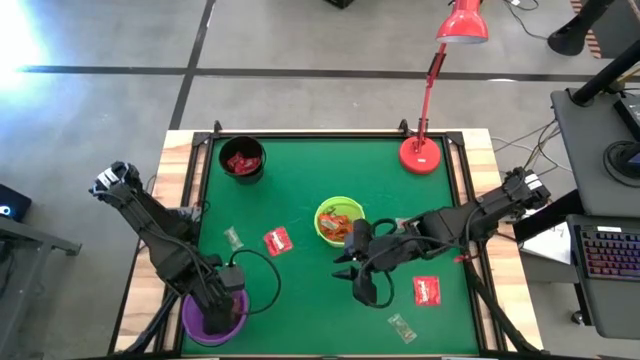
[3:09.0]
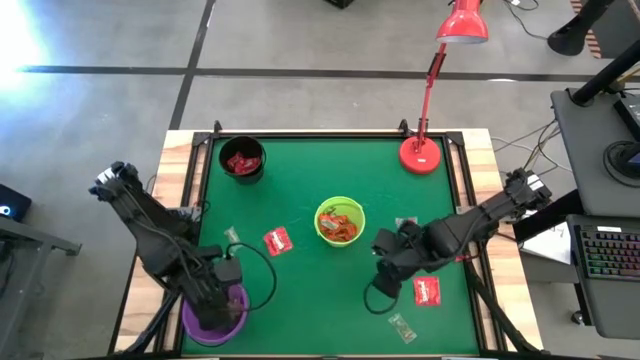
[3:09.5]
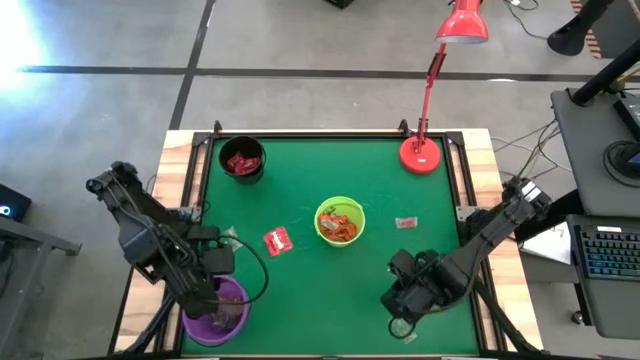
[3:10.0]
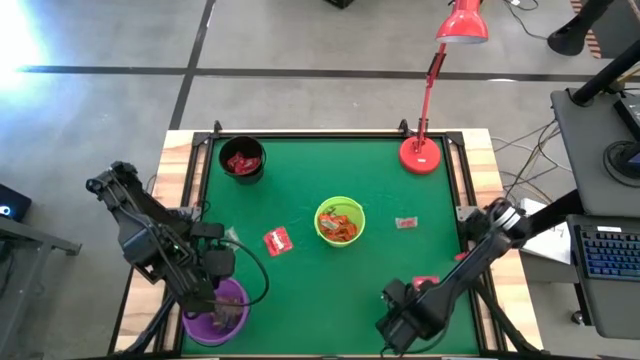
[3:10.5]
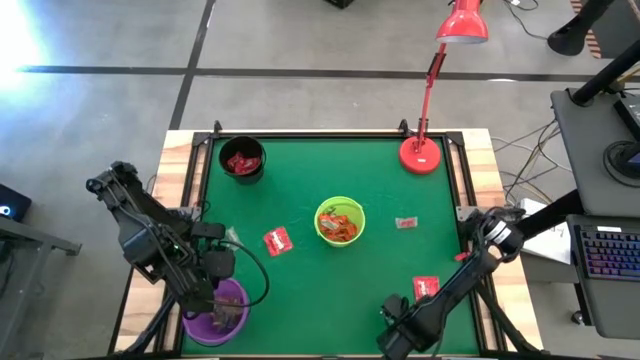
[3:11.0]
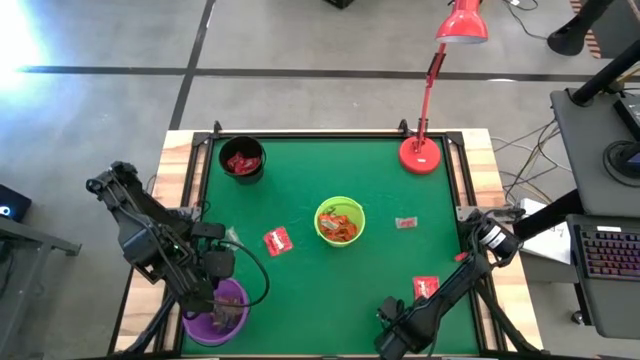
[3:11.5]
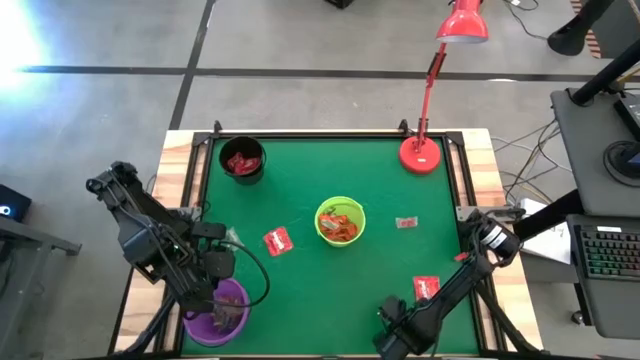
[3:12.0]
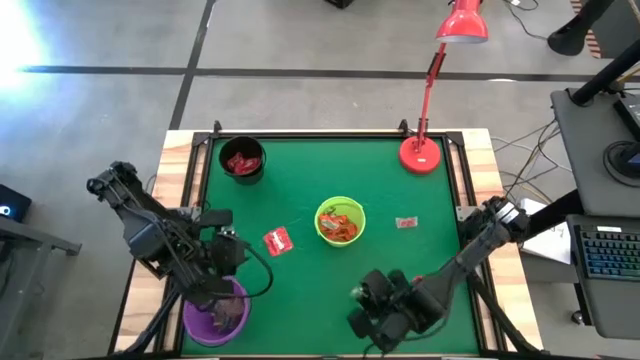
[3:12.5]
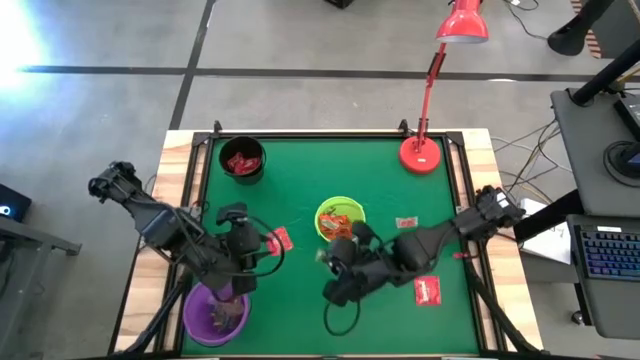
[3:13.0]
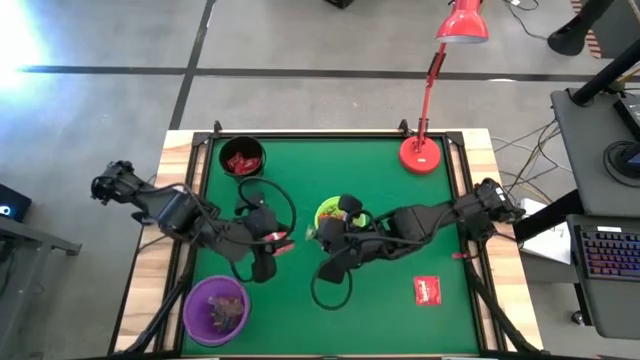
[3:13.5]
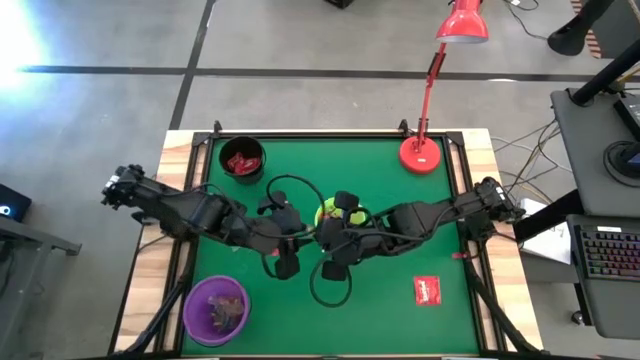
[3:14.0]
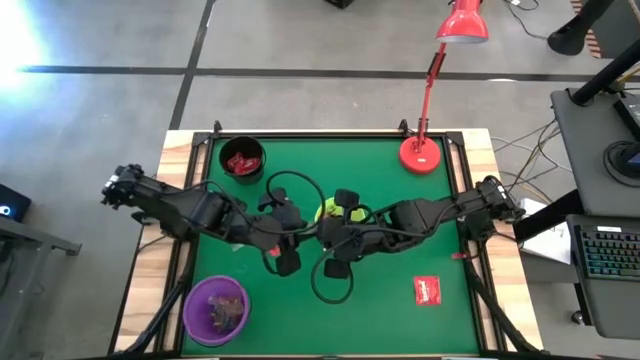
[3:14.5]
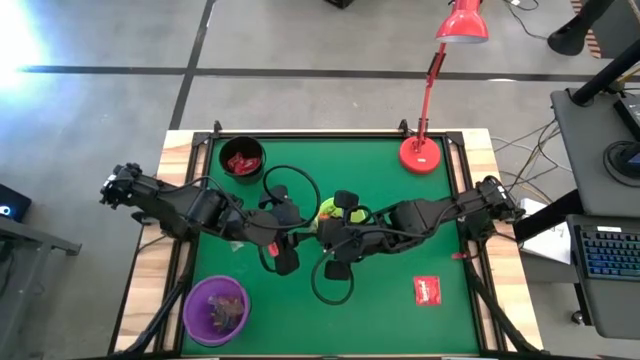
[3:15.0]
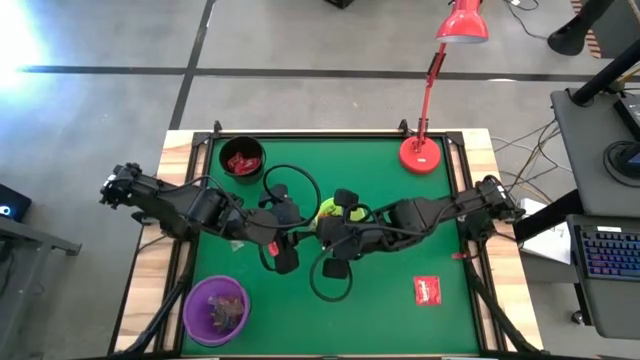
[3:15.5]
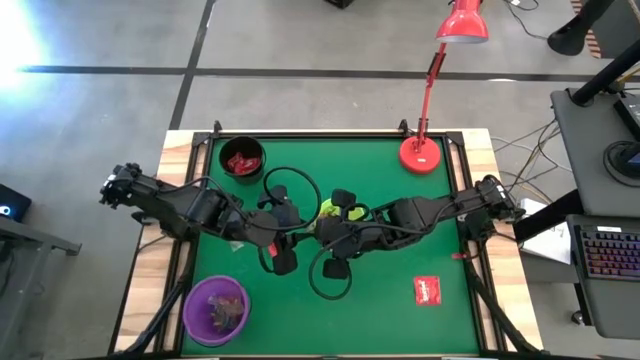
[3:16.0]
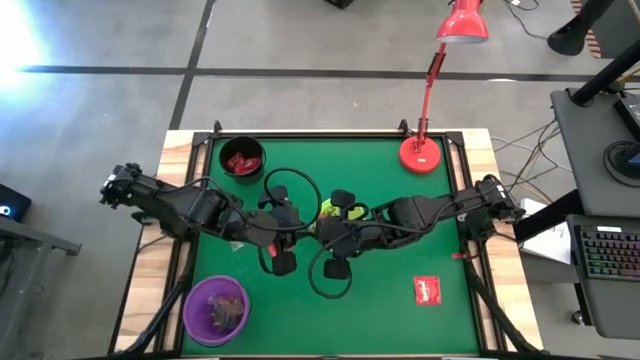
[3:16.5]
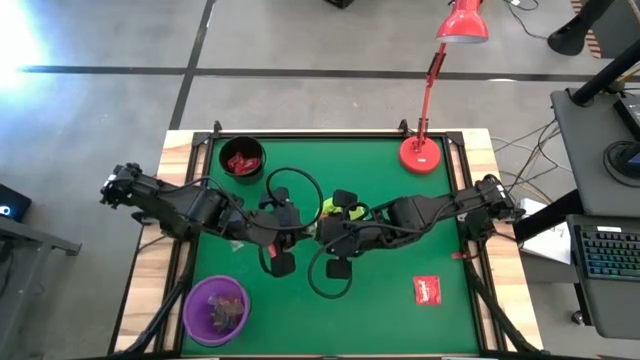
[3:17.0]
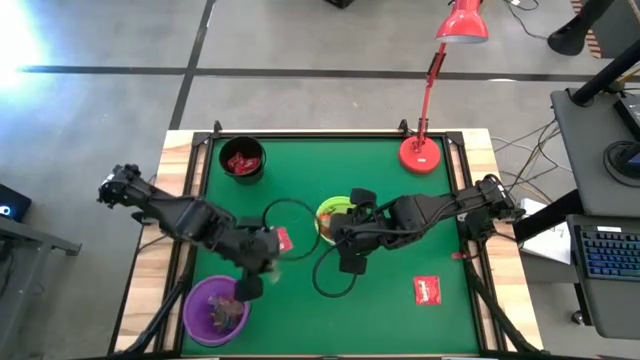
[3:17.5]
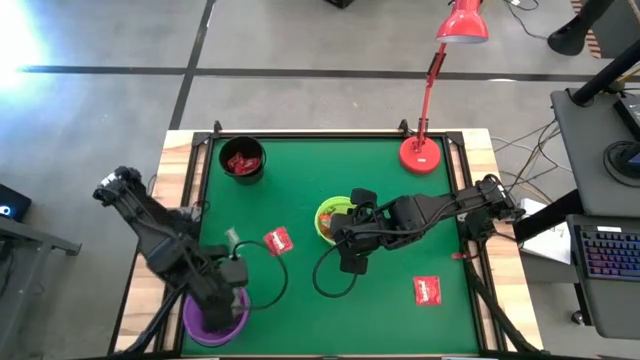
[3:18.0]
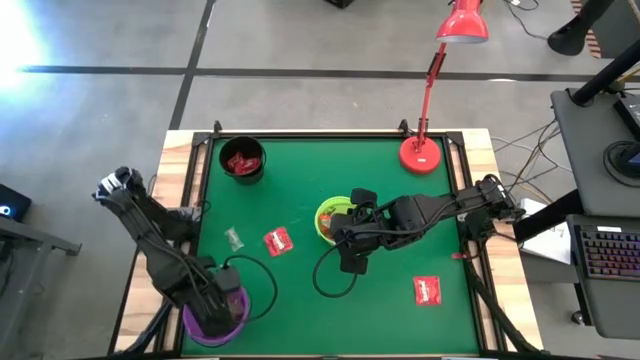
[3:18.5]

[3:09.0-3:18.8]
Task: Sort candy
Put the green gummy into the purple bucket

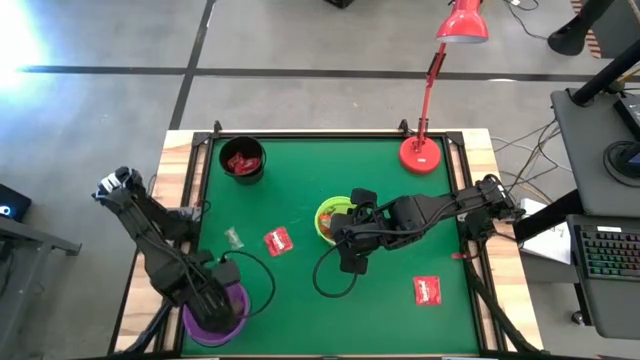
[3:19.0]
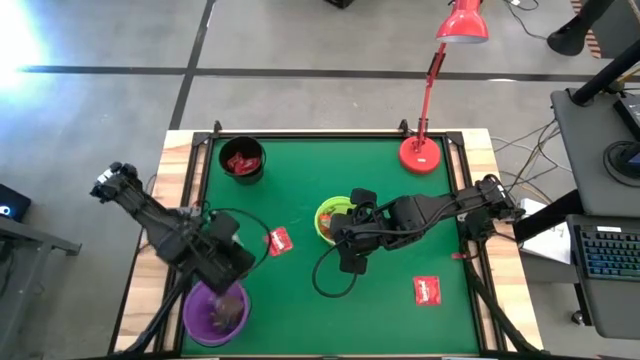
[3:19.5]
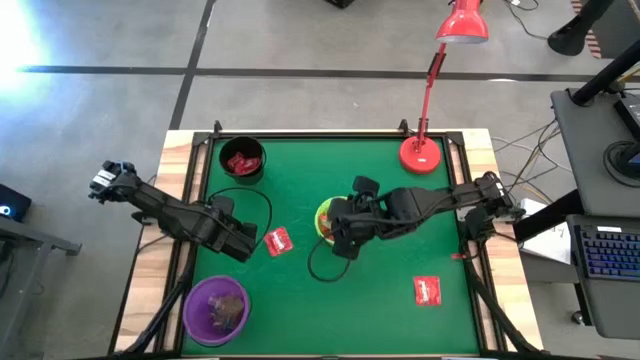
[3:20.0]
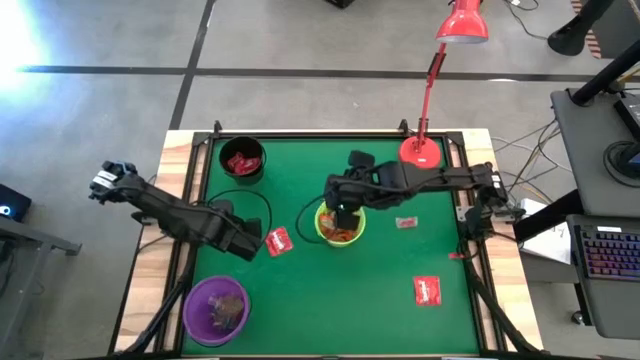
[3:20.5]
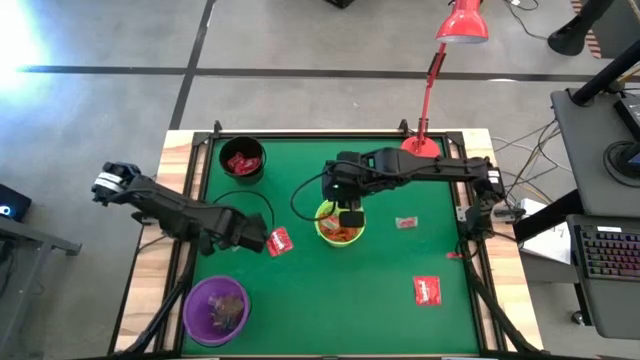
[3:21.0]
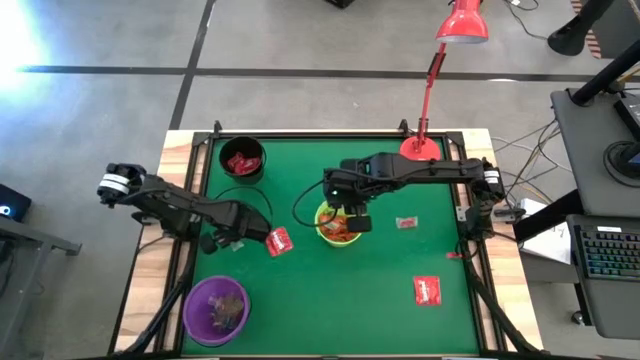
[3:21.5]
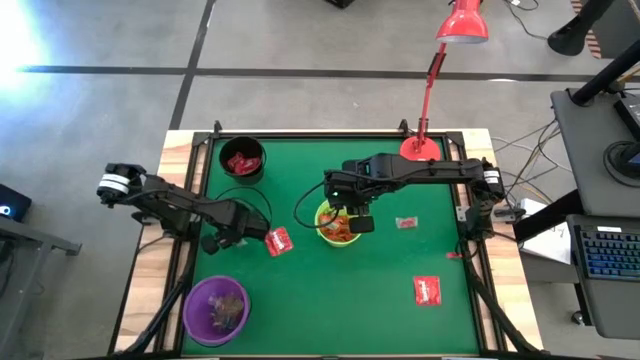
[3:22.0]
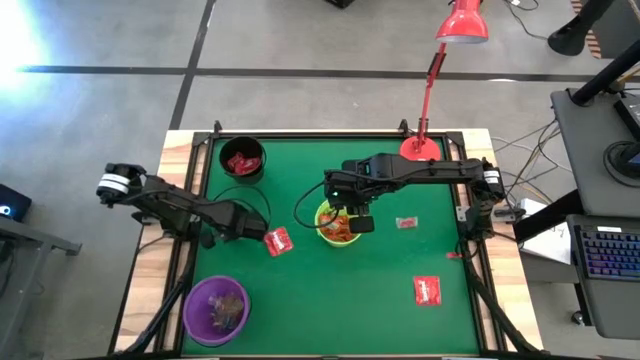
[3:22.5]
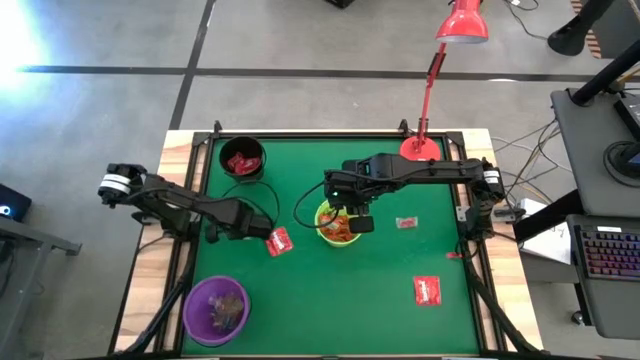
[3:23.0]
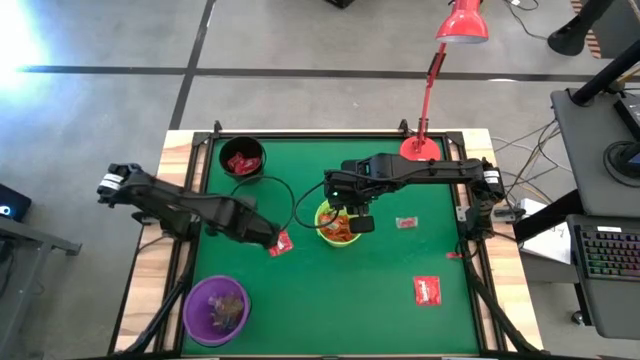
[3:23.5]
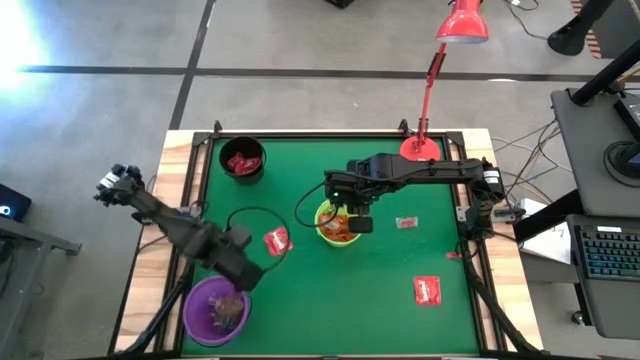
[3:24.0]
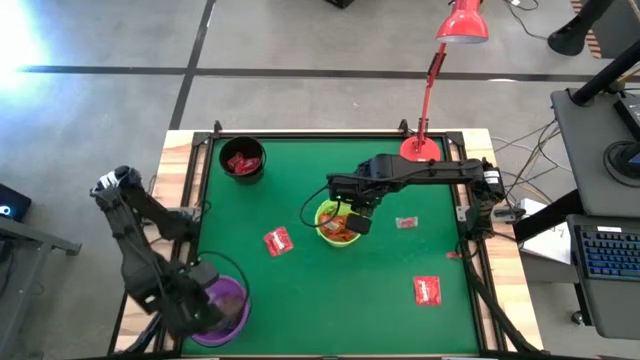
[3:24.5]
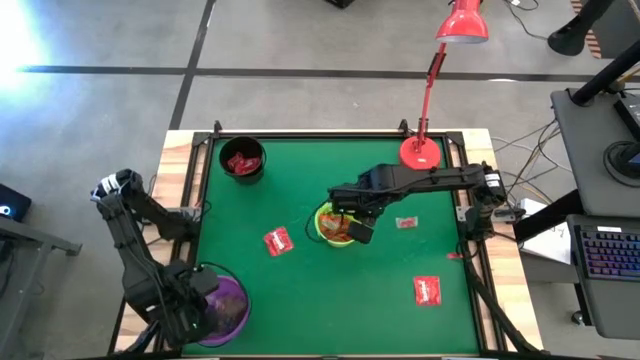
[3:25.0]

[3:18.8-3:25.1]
Put the green gummy into the purple bucket

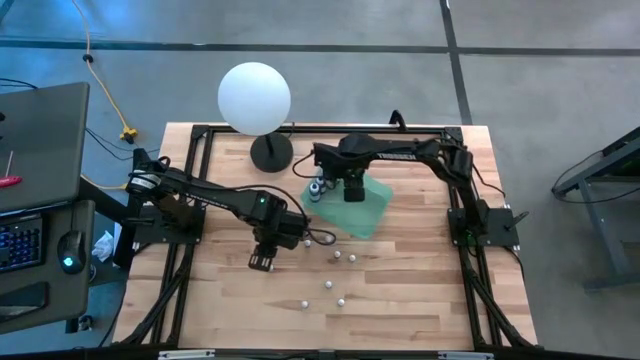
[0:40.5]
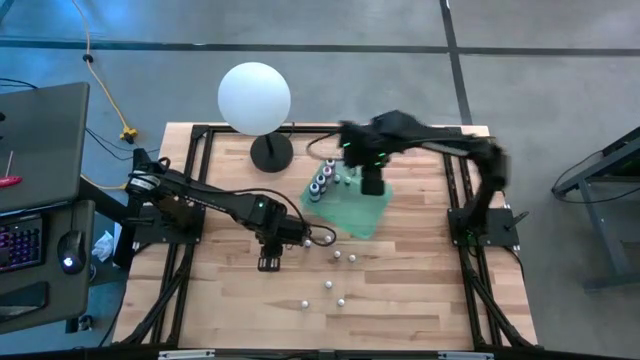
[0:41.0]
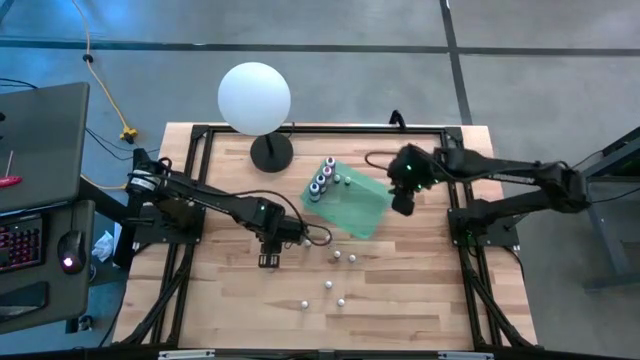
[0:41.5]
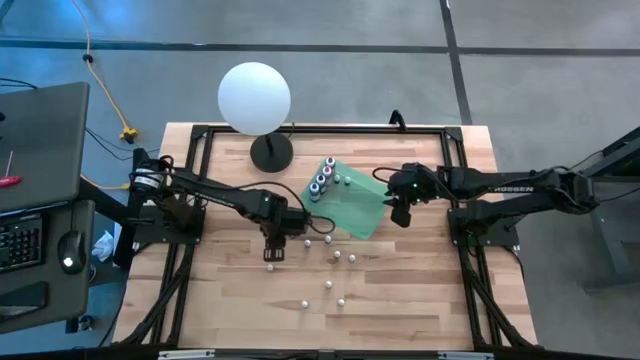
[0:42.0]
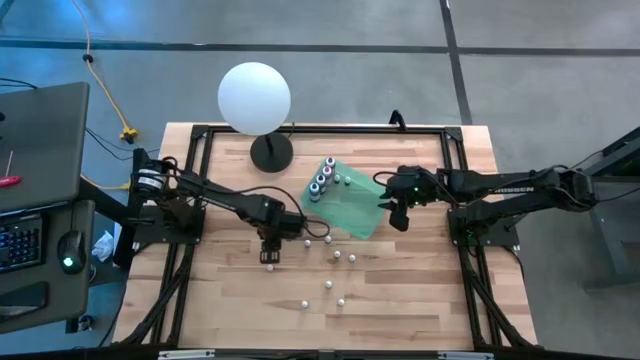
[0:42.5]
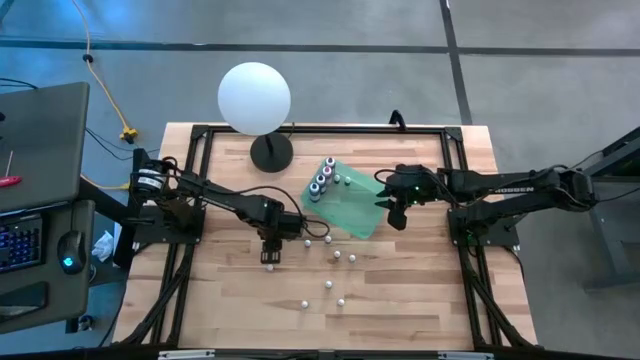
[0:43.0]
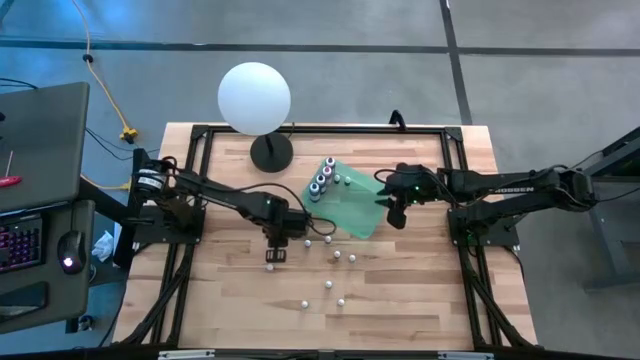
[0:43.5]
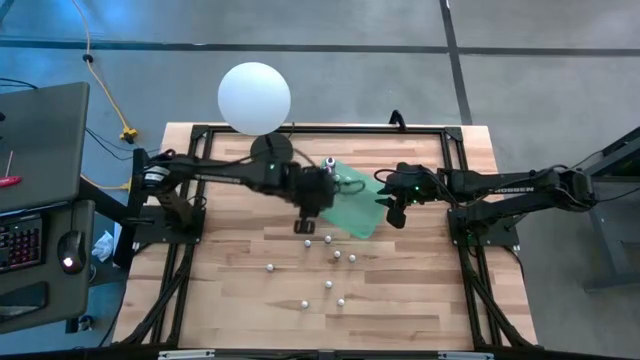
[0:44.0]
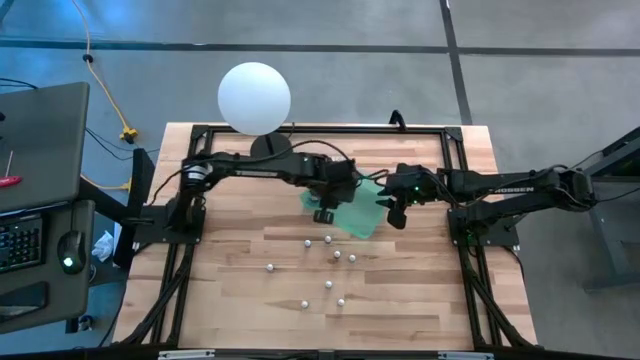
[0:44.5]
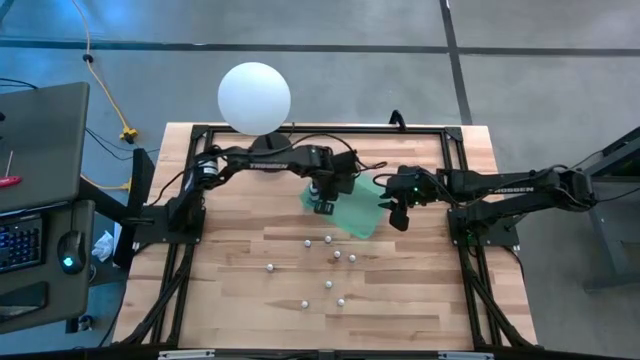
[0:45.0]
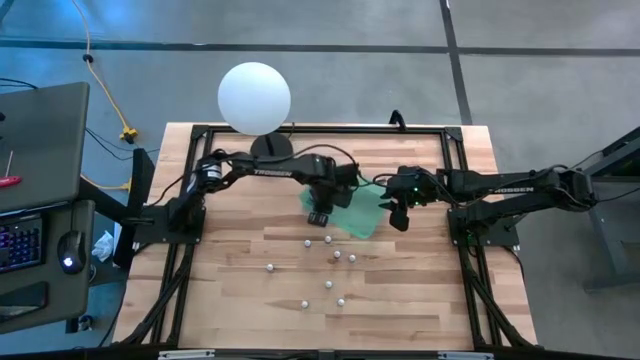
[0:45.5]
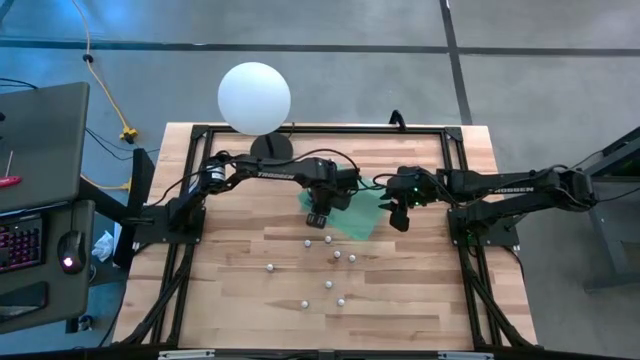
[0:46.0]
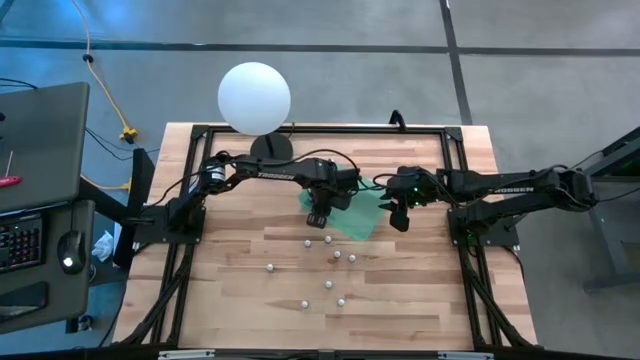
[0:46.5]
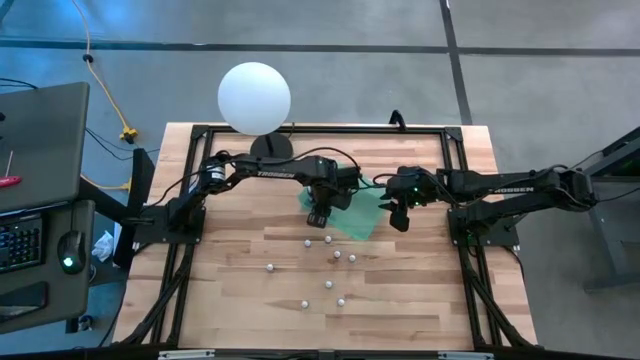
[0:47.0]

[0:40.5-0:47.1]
Task: Pick & Place food coloring
Put the small blue food coloring bottle into the green container
